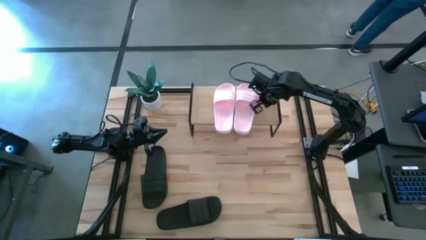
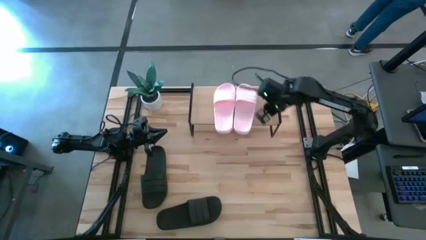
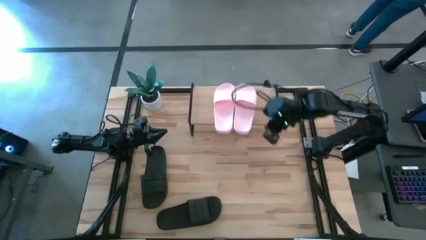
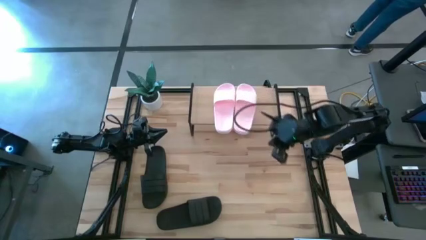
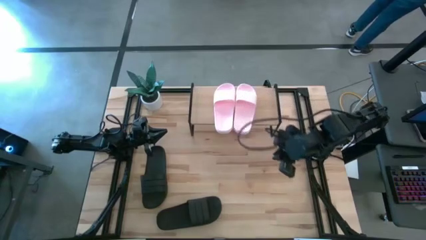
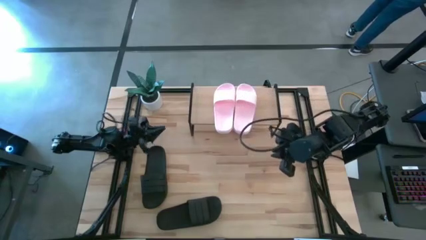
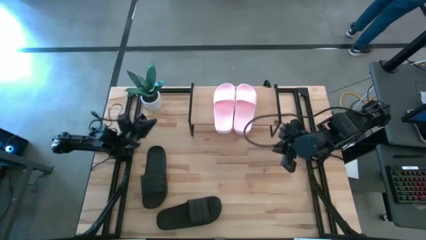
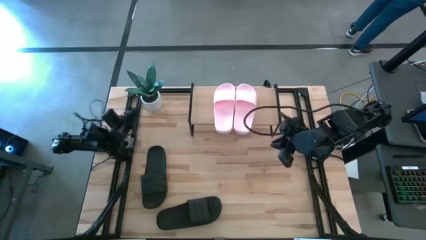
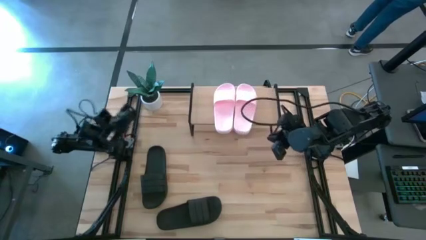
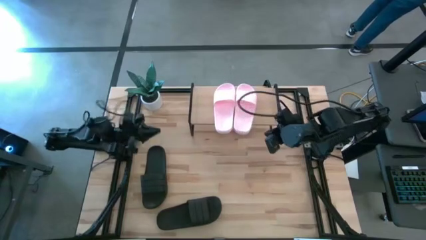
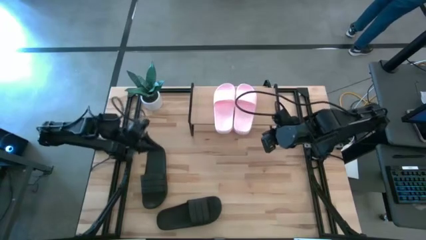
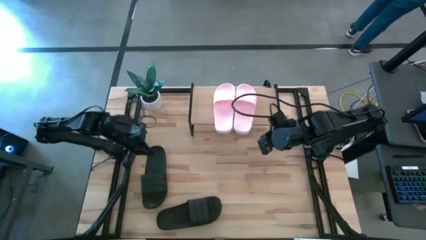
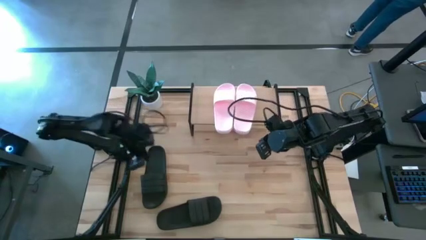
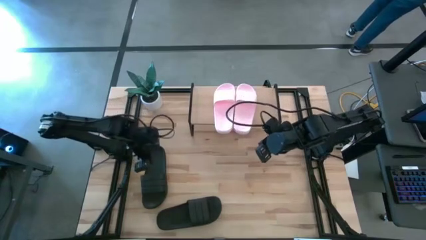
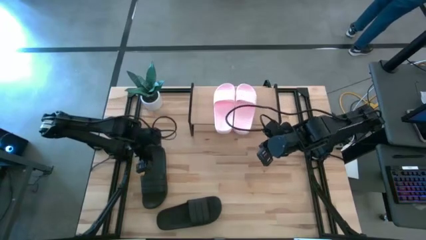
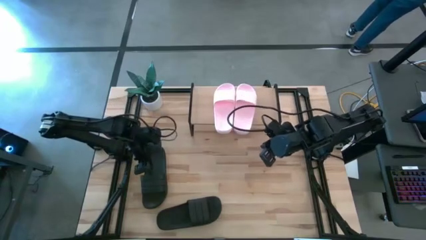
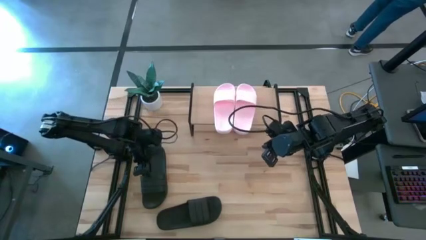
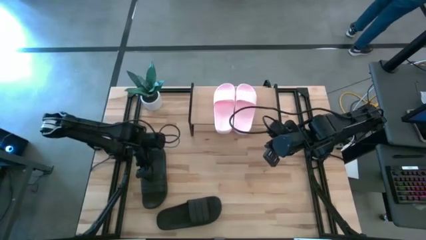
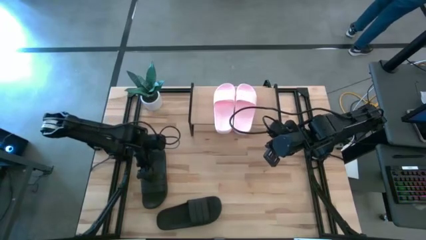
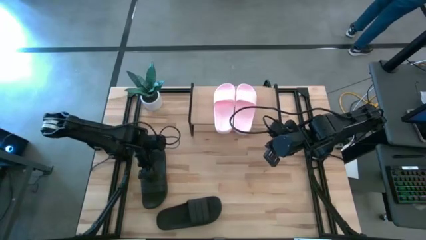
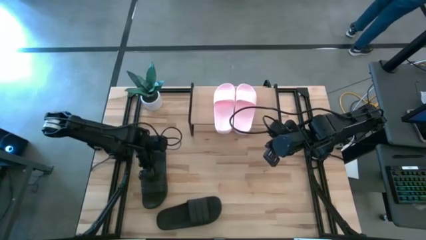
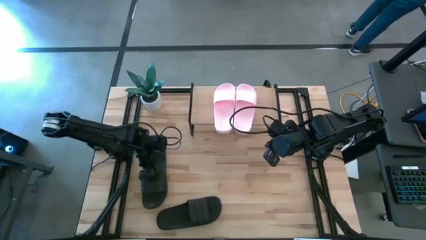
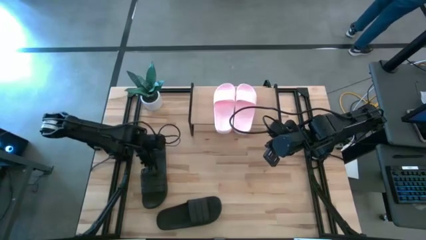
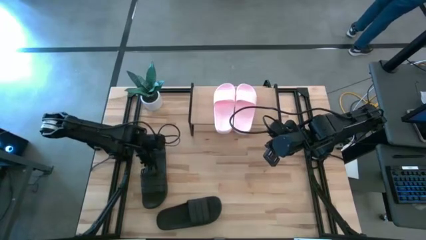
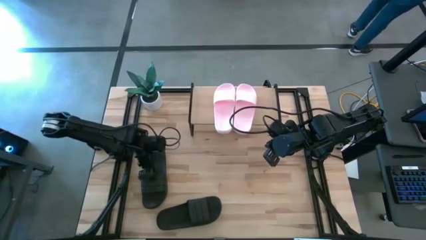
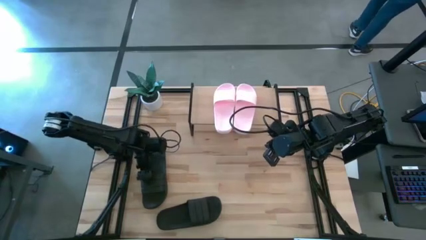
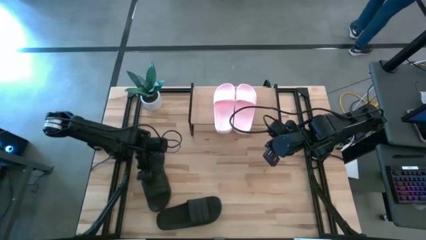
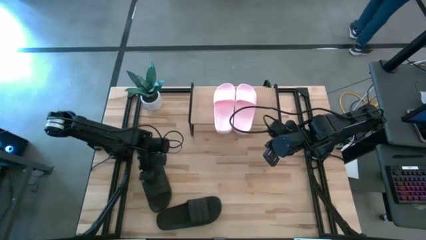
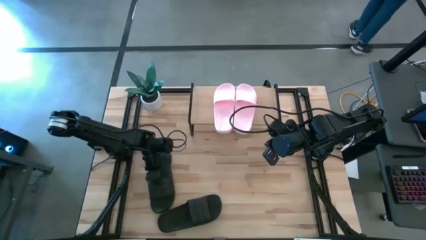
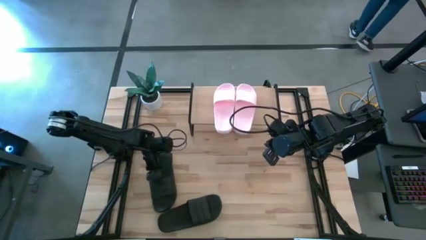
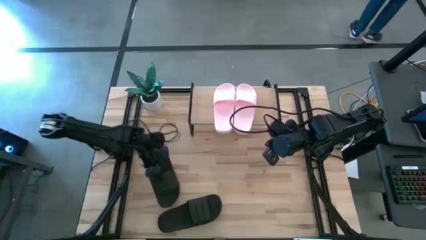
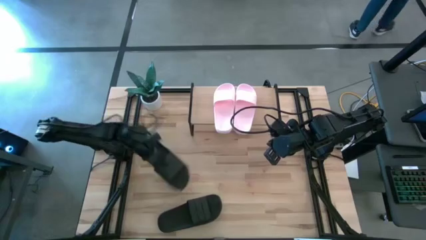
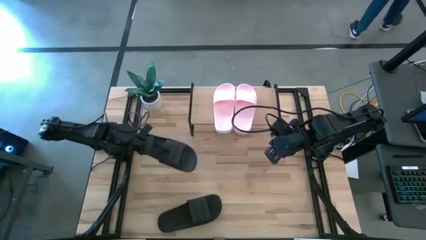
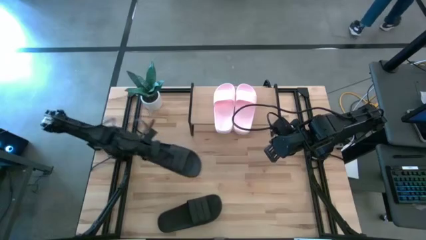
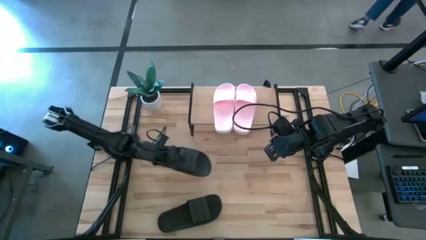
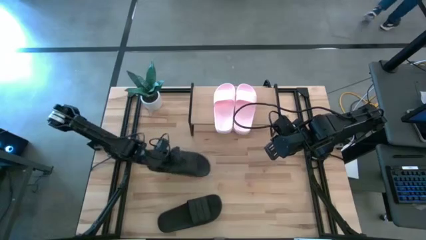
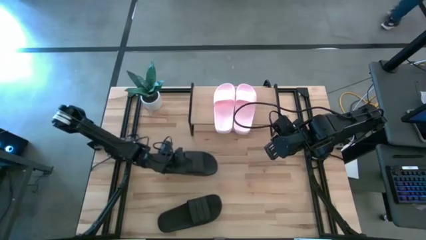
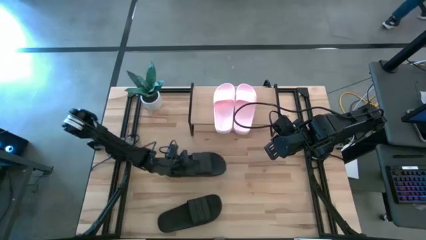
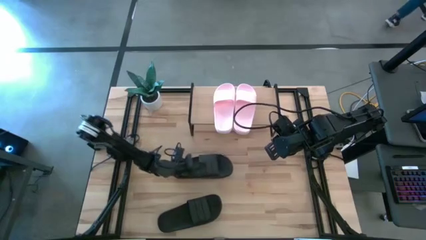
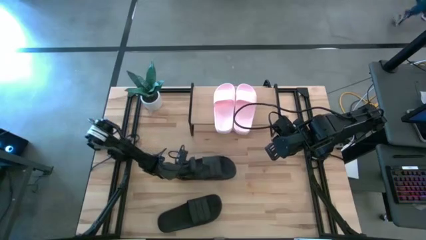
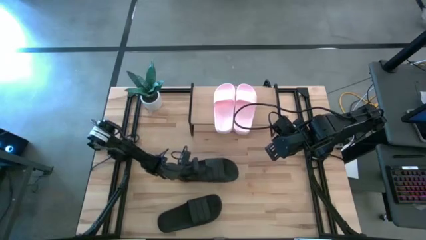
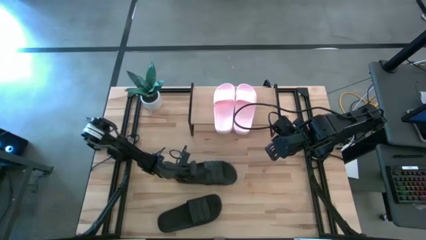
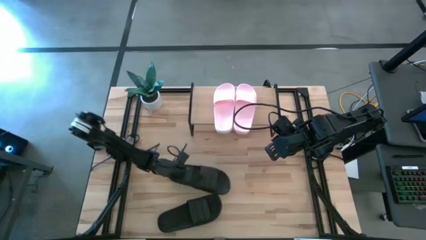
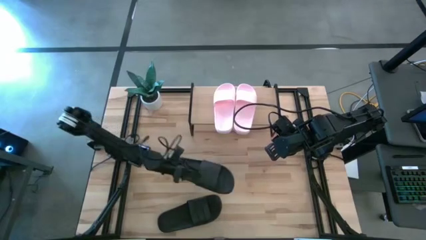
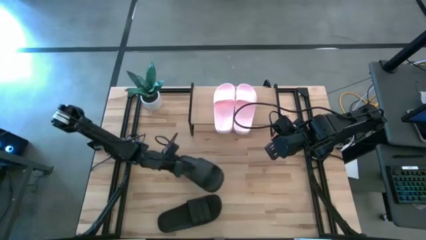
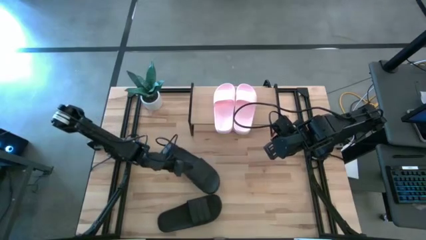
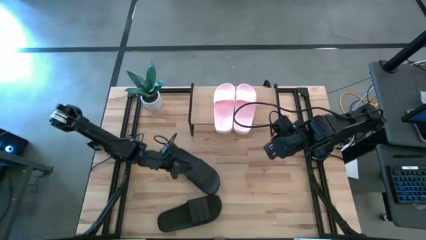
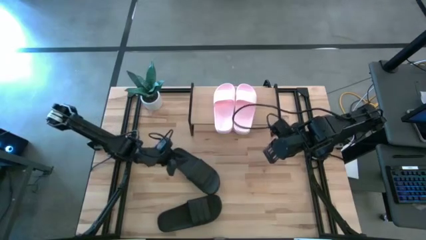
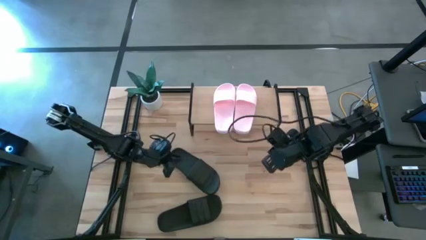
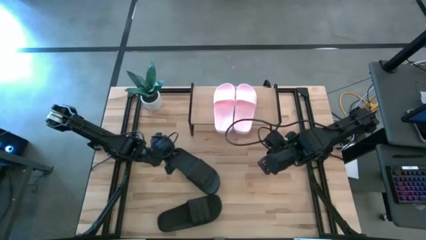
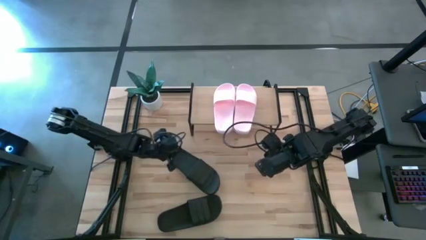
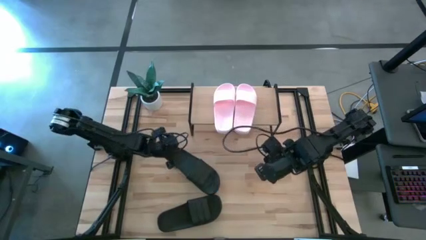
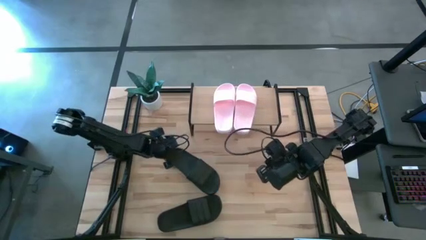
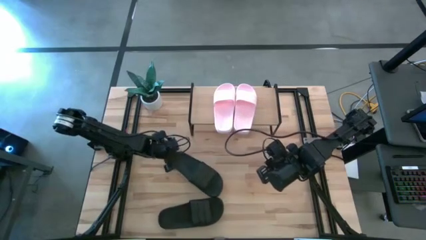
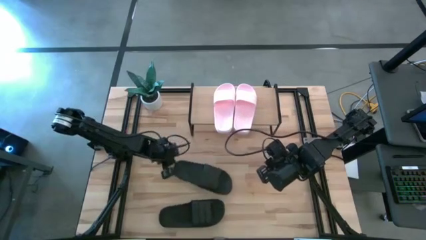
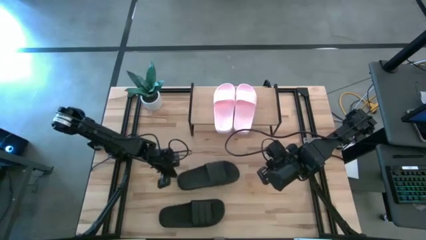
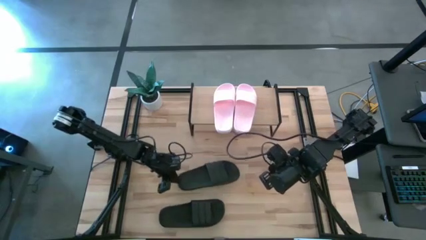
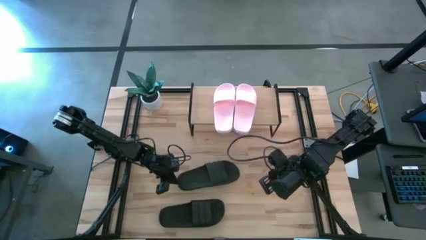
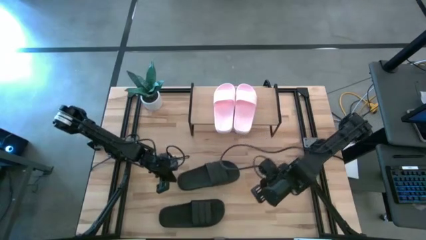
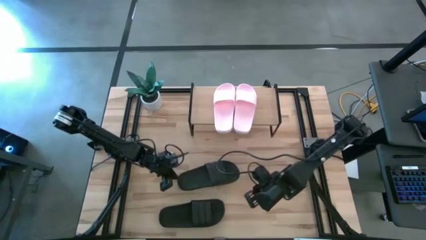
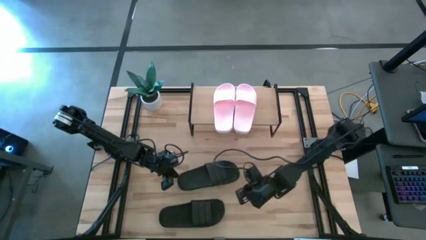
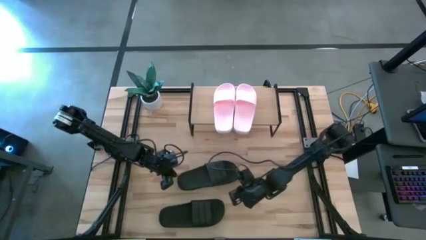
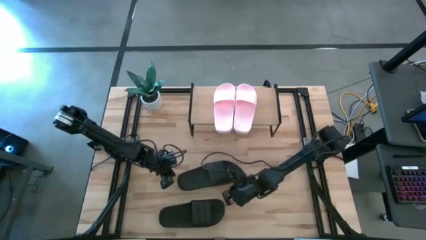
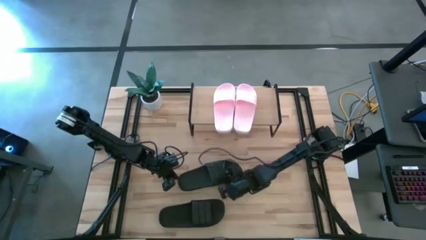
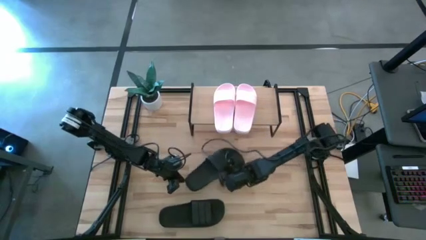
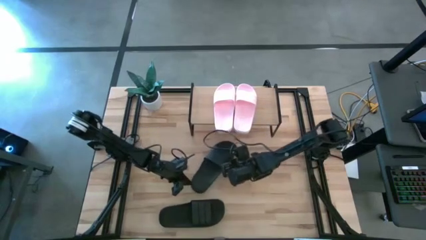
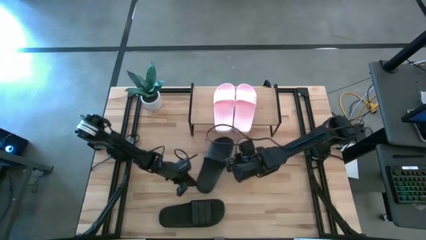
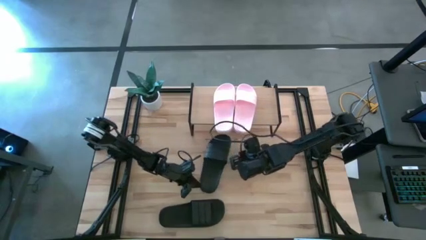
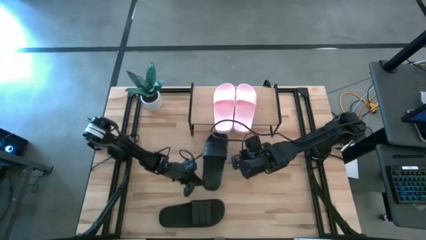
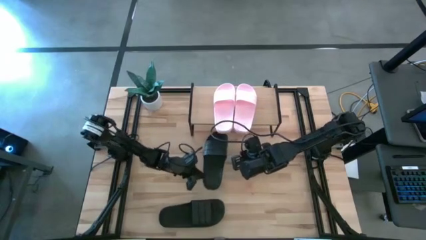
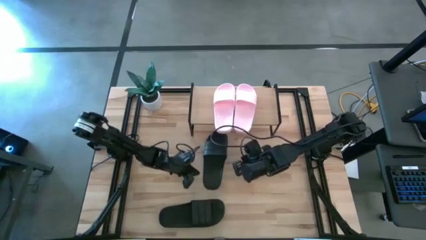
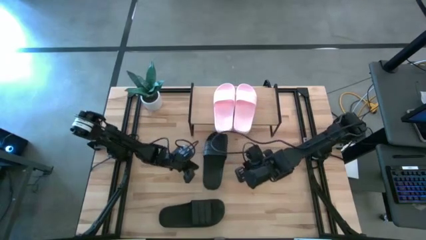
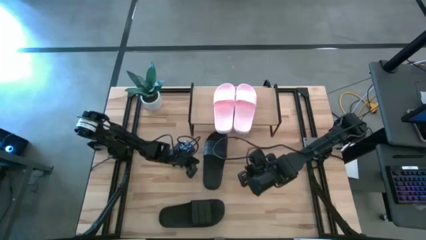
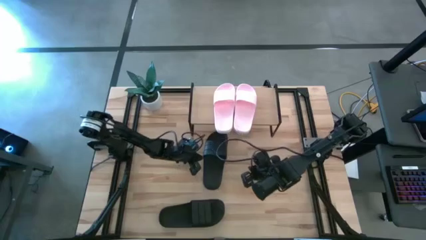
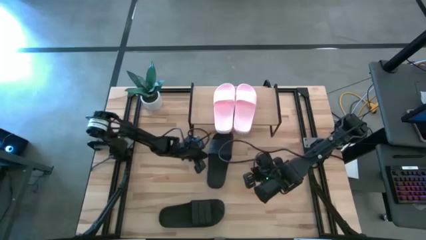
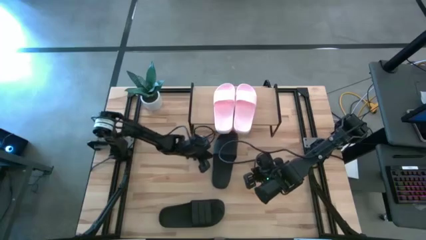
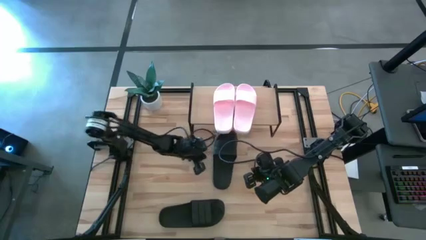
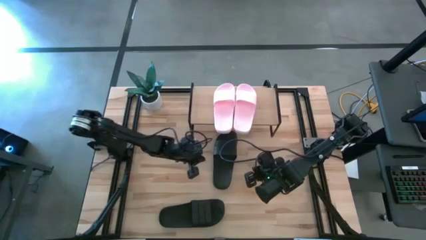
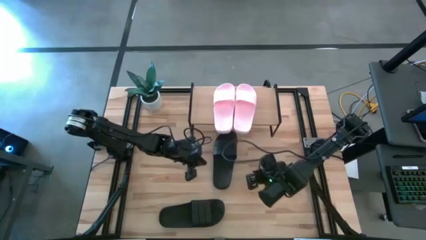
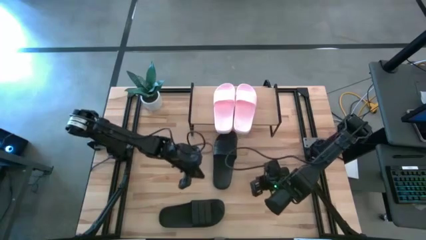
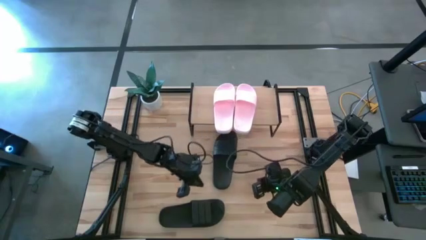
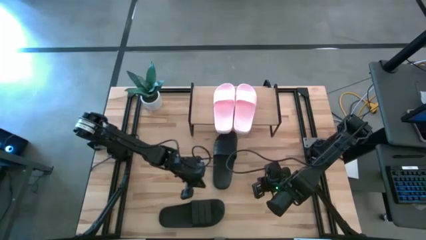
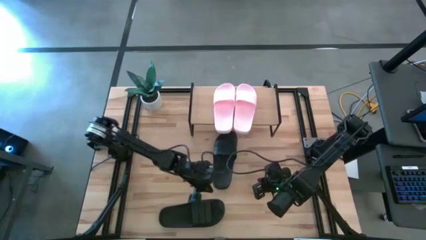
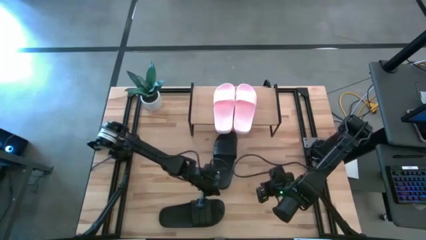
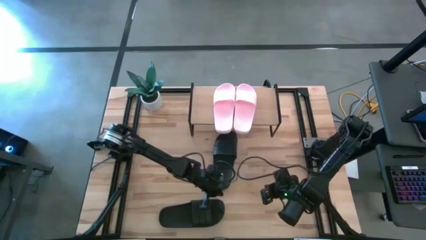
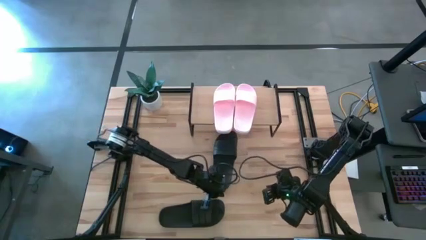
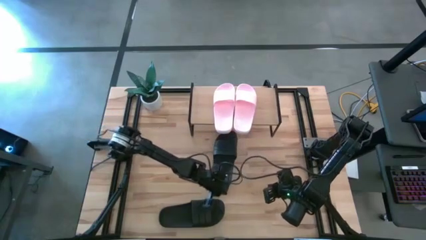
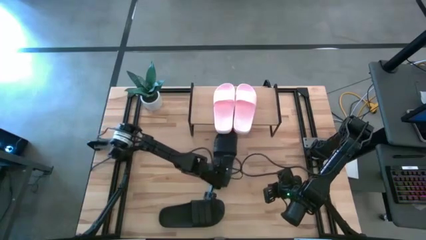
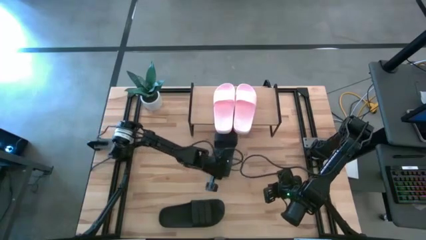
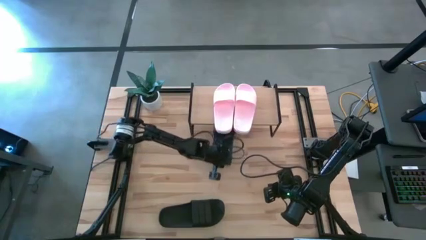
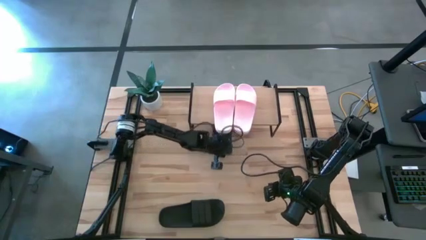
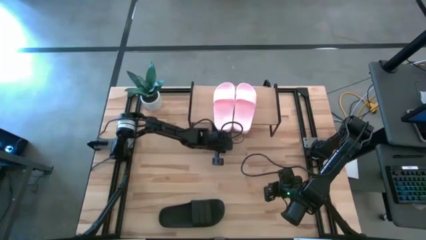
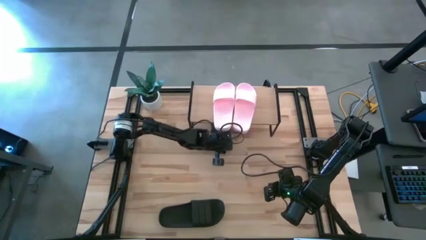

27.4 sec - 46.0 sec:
Task: Pick and place slides into the shelf
Put the top black slipper under the shelf
